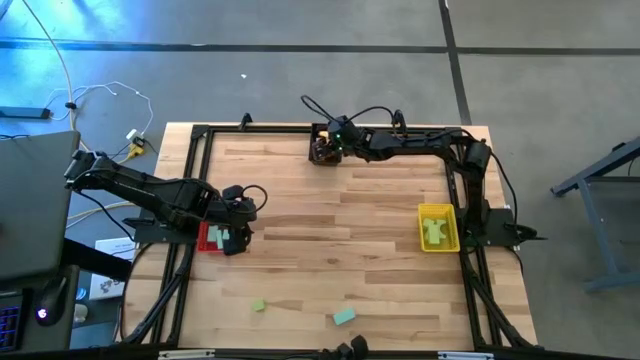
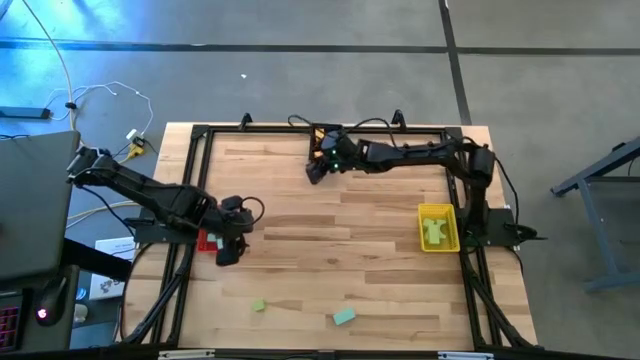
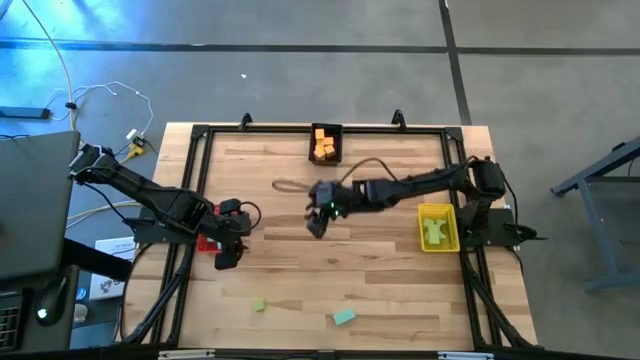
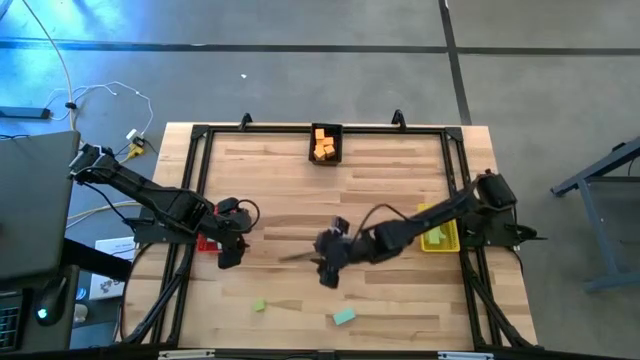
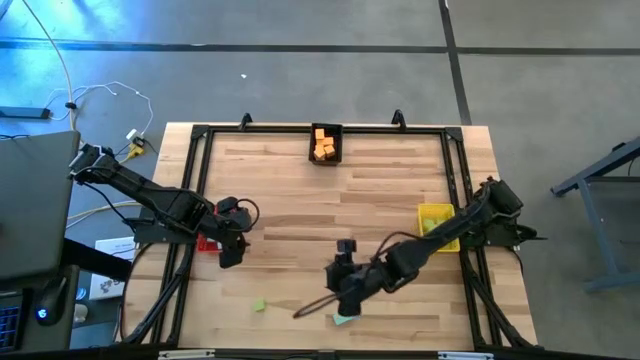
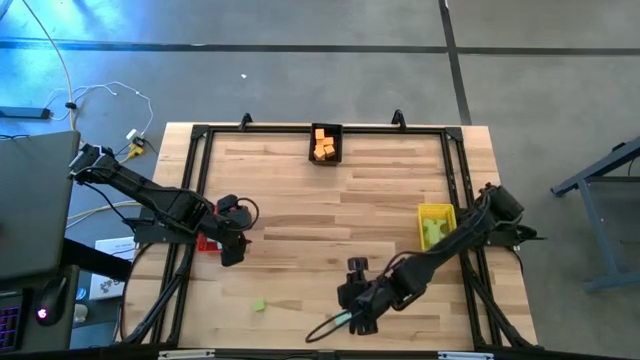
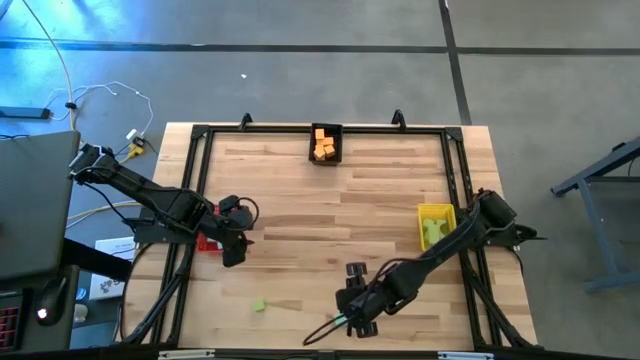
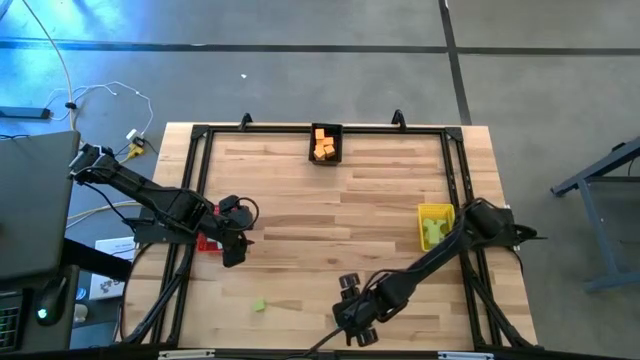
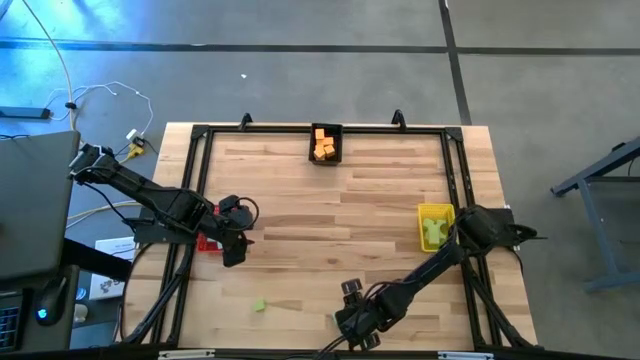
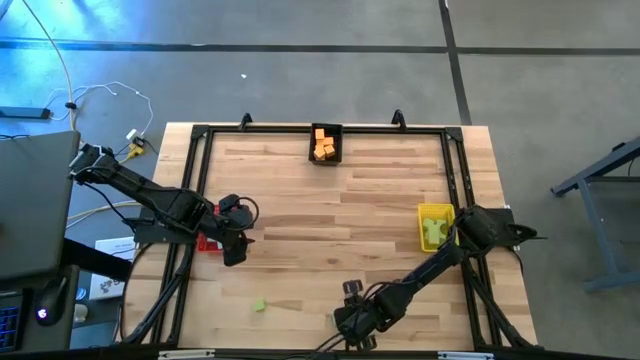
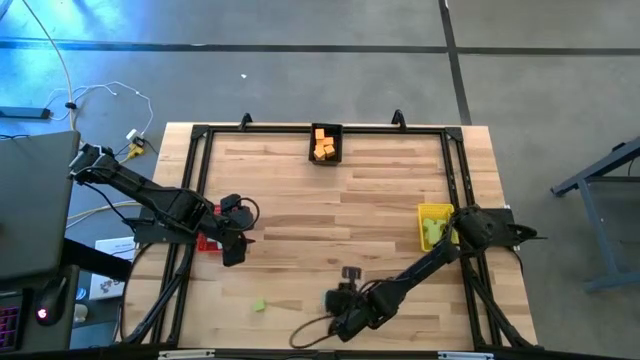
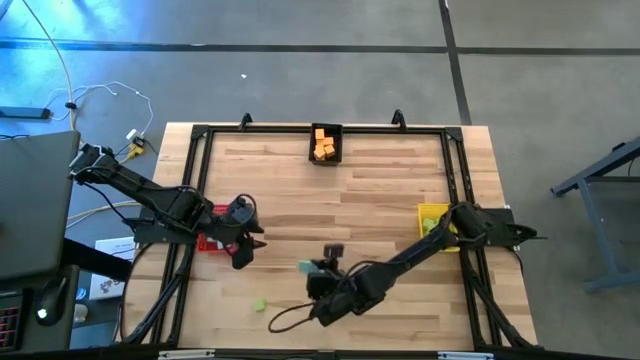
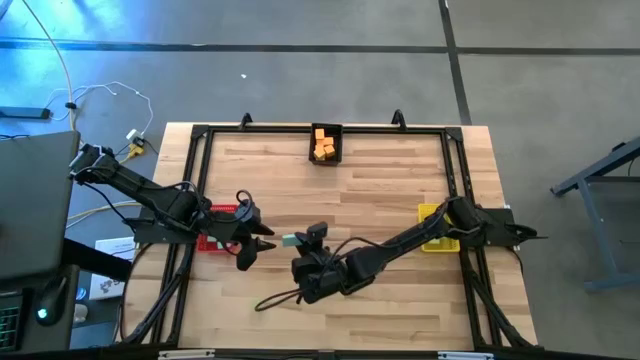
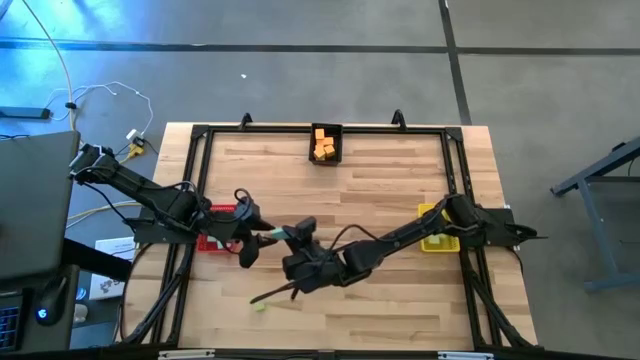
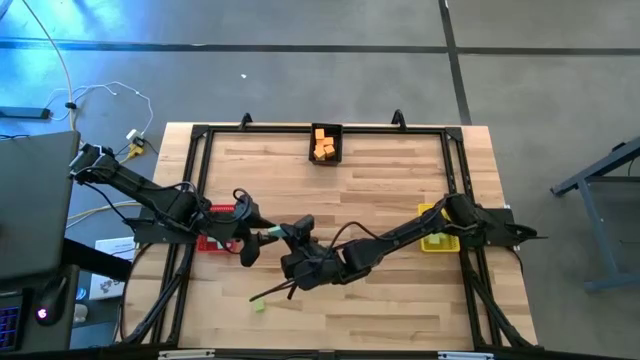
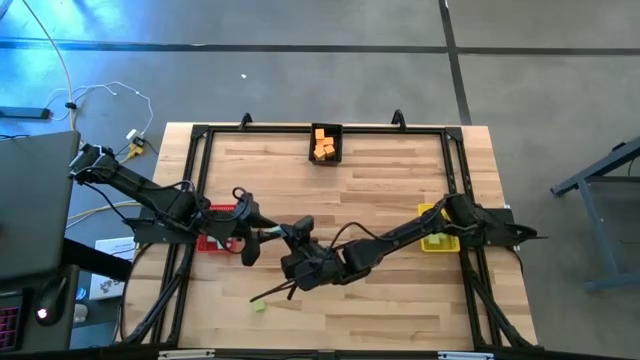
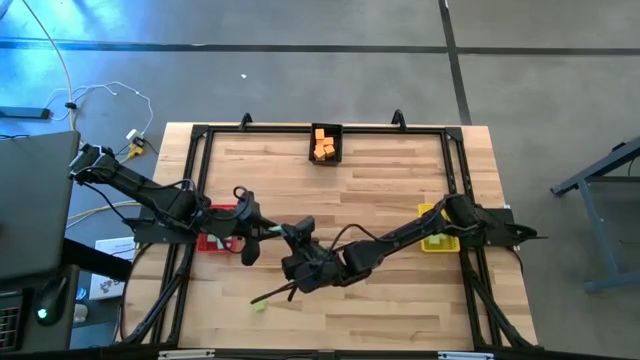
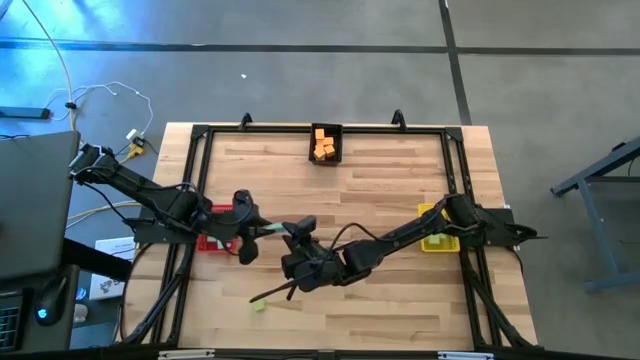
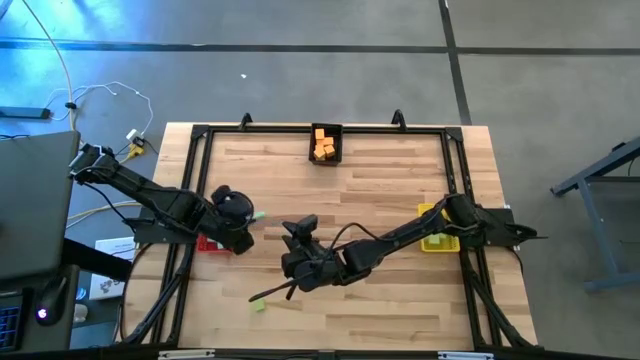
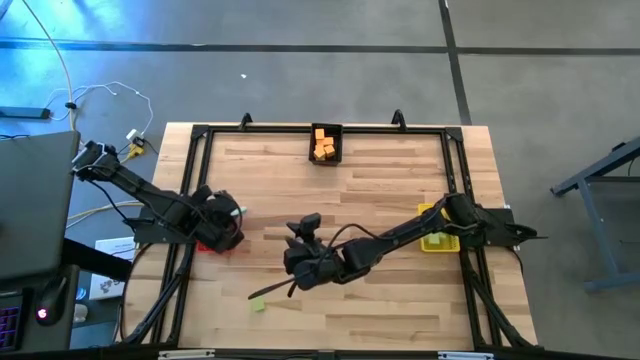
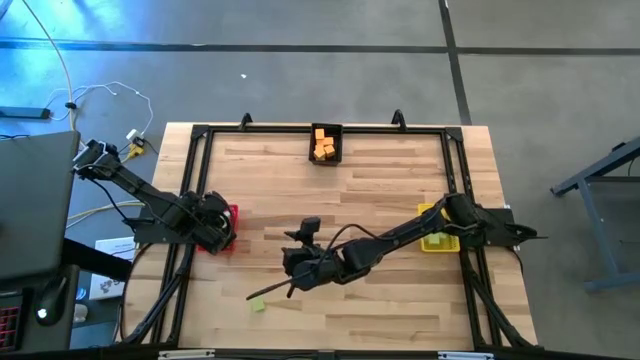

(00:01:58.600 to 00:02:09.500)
Task: Sort & place blocks by color
Put the blue block into the red bin

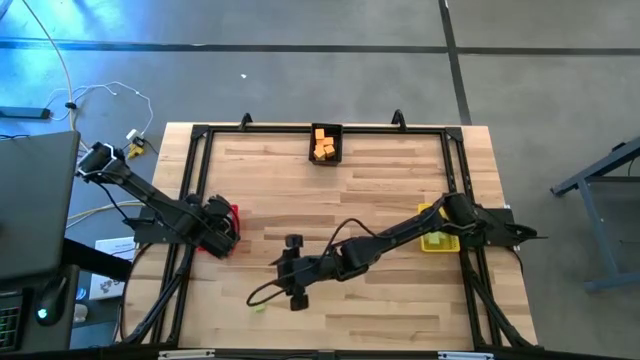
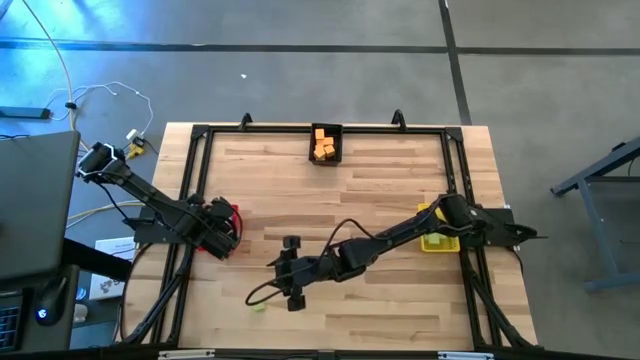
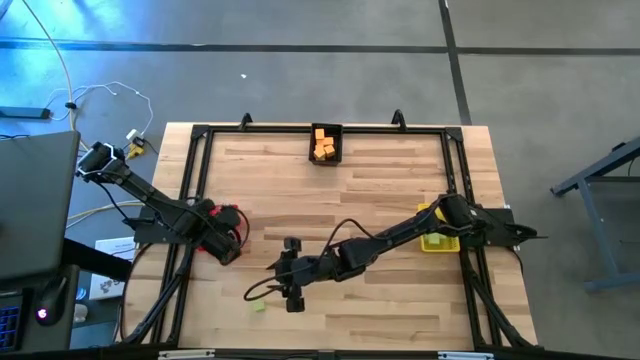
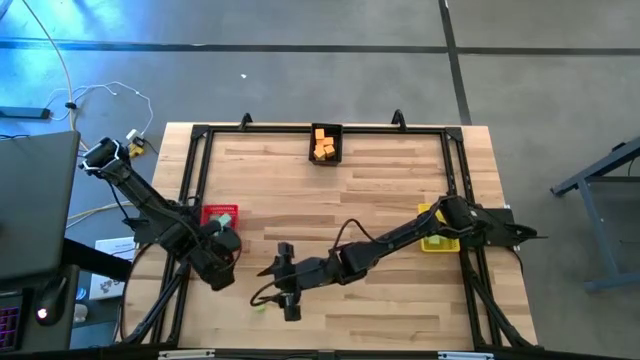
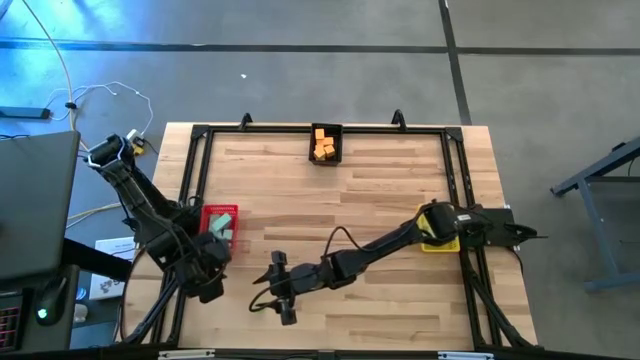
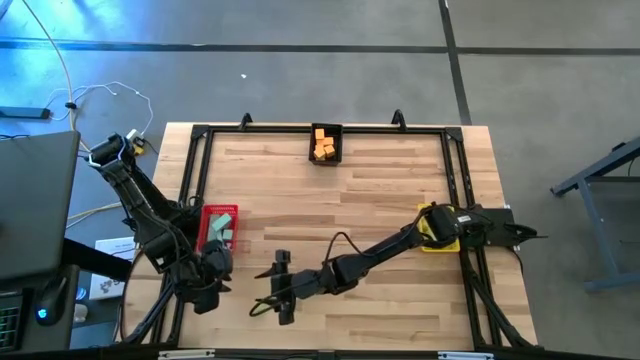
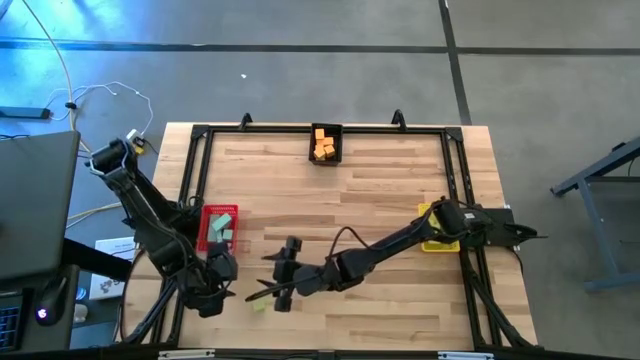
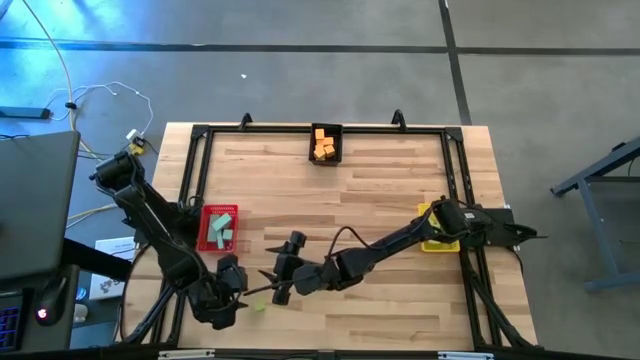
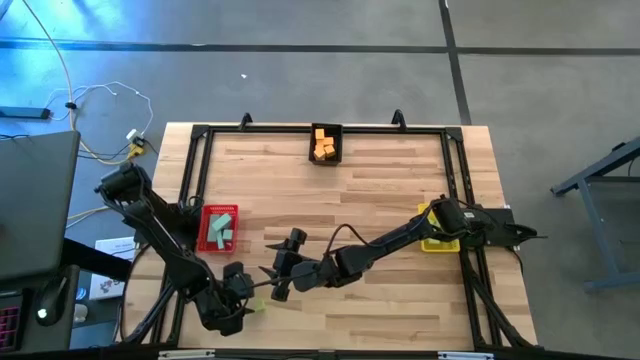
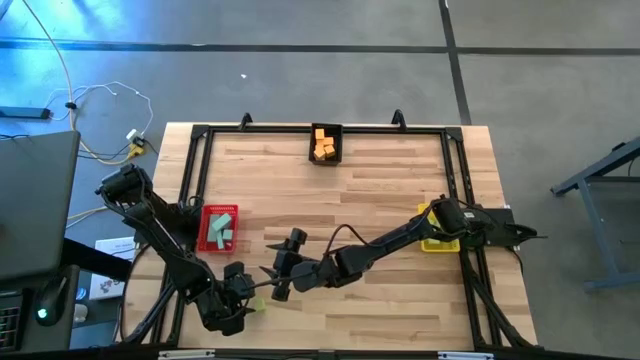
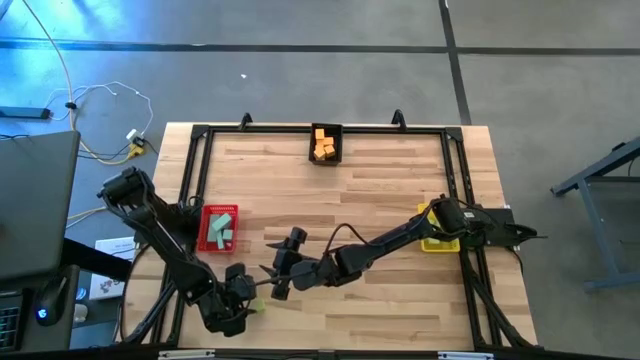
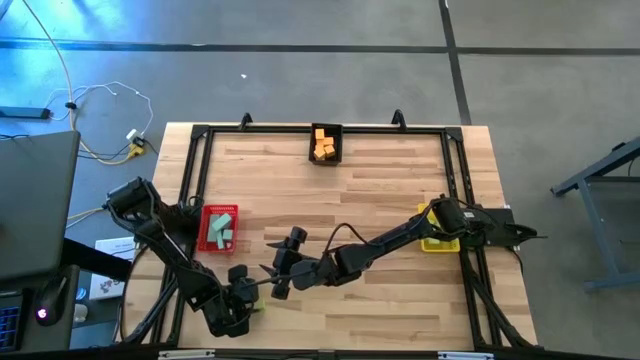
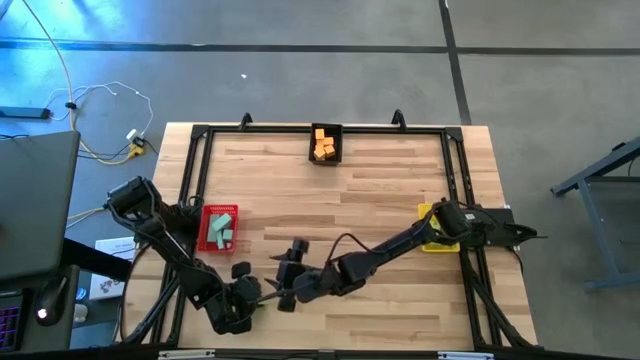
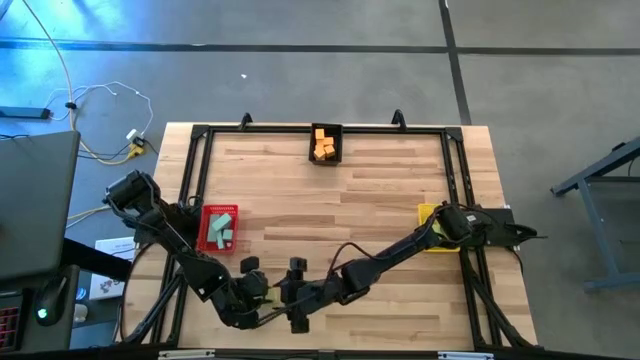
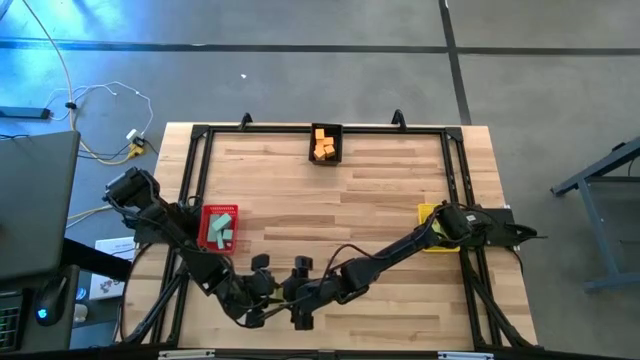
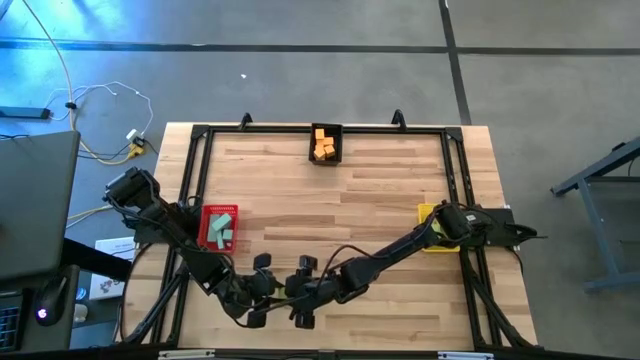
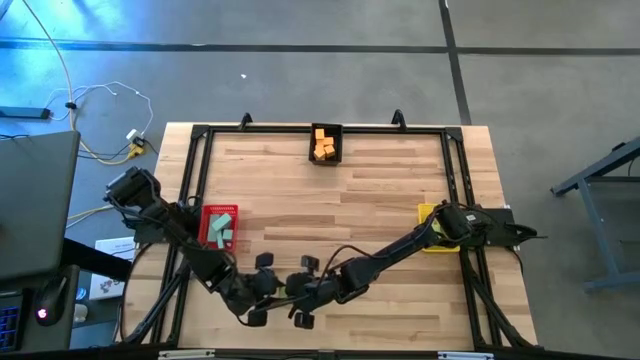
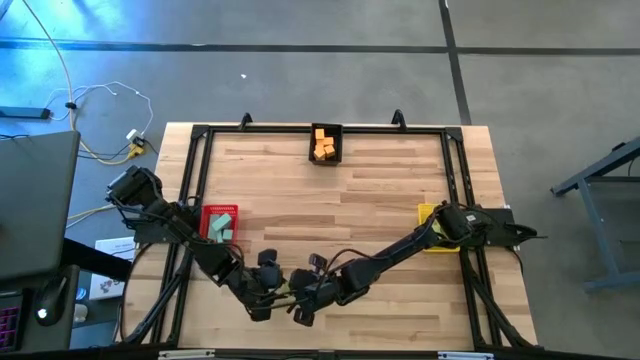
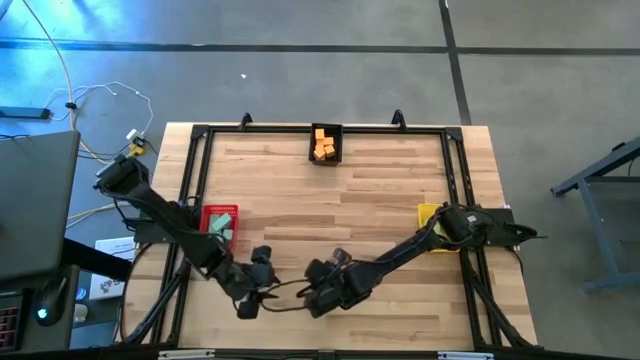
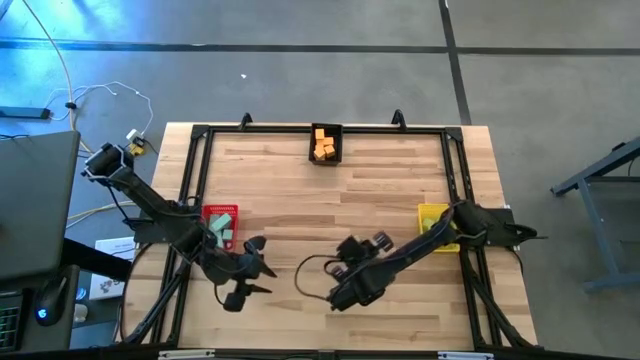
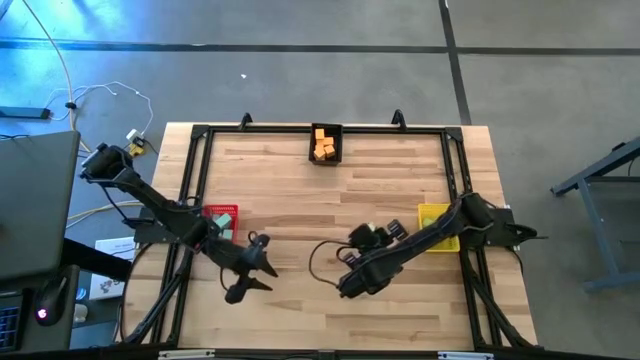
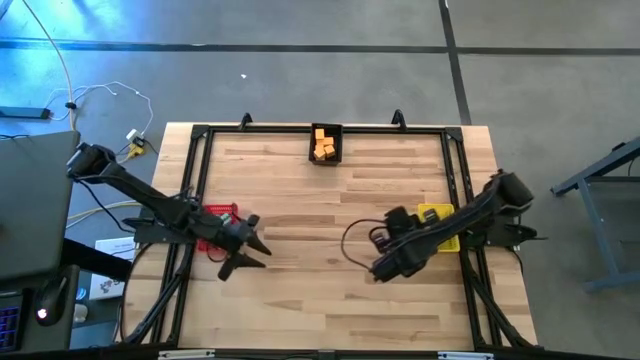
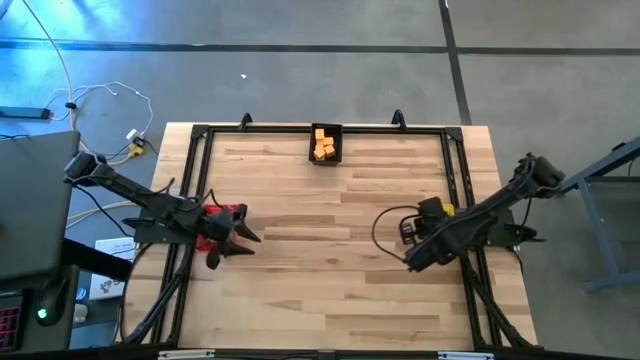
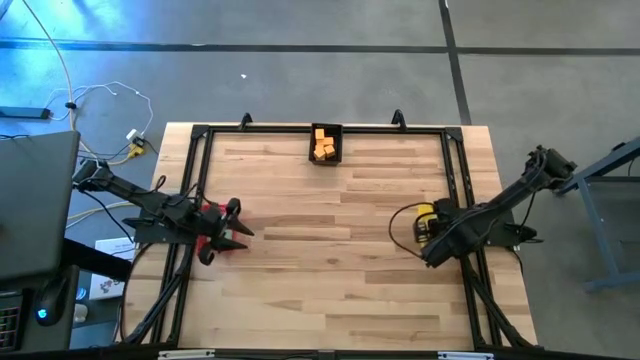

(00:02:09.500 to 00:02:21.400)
Put the green block into the yellow bin
